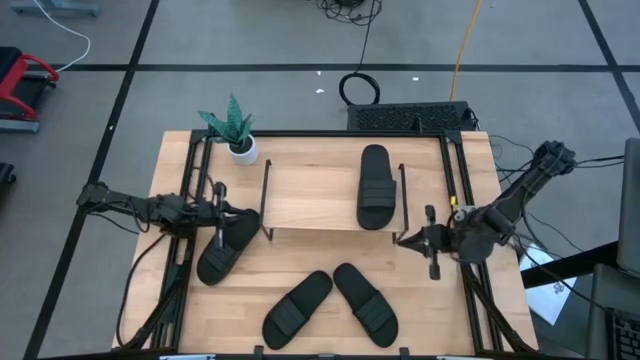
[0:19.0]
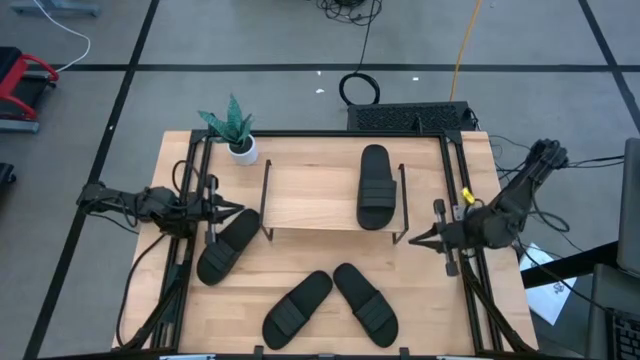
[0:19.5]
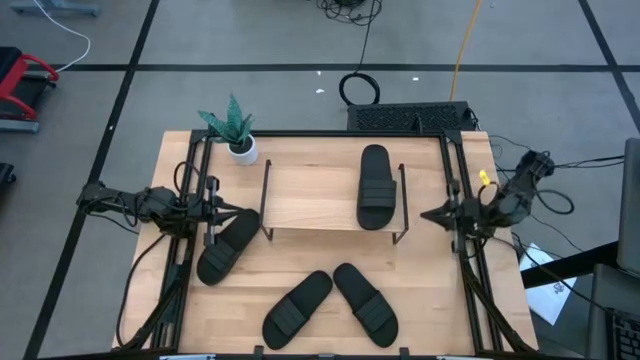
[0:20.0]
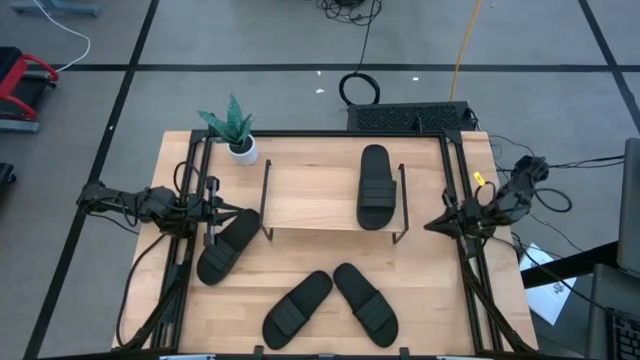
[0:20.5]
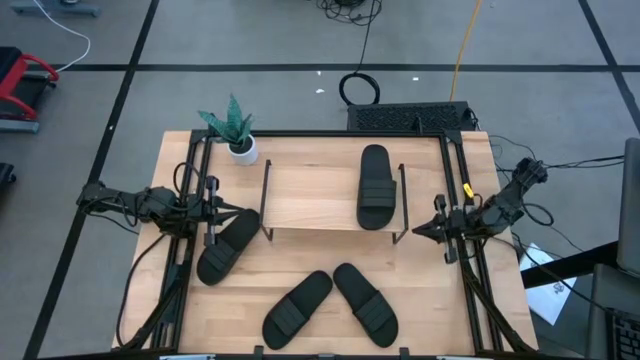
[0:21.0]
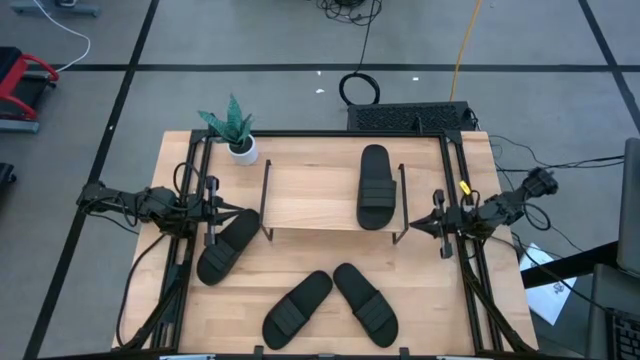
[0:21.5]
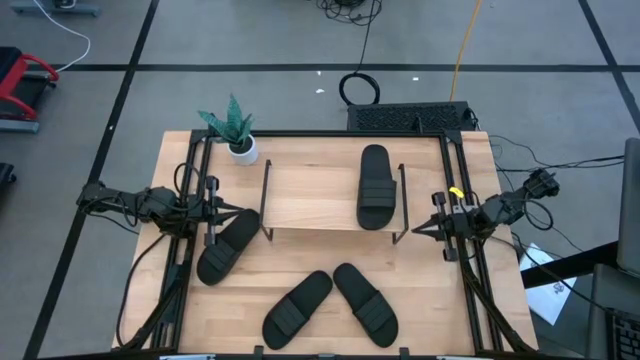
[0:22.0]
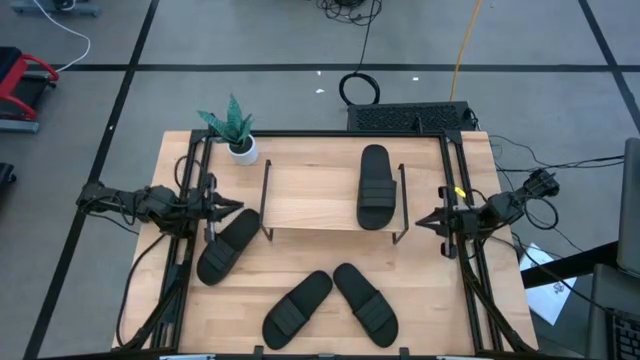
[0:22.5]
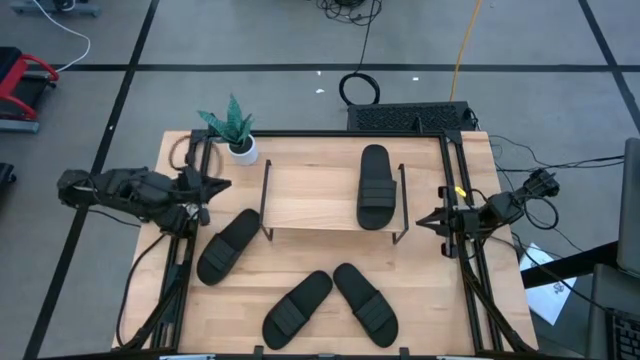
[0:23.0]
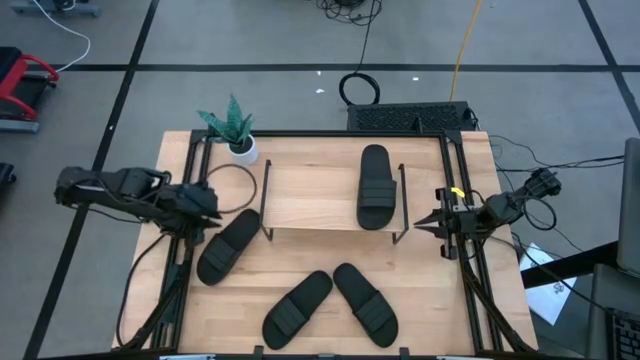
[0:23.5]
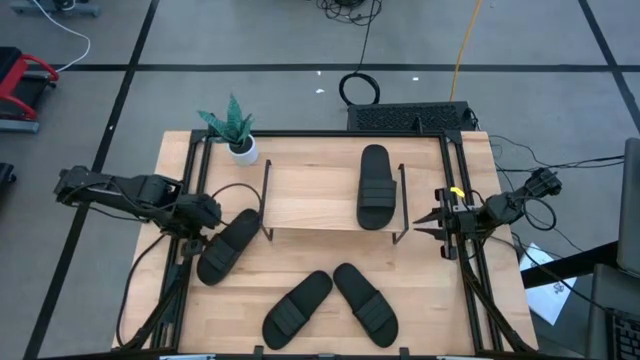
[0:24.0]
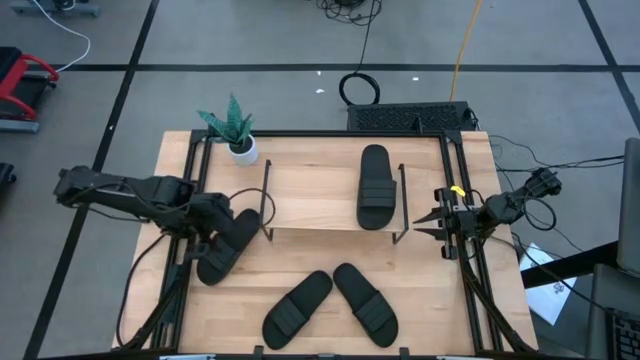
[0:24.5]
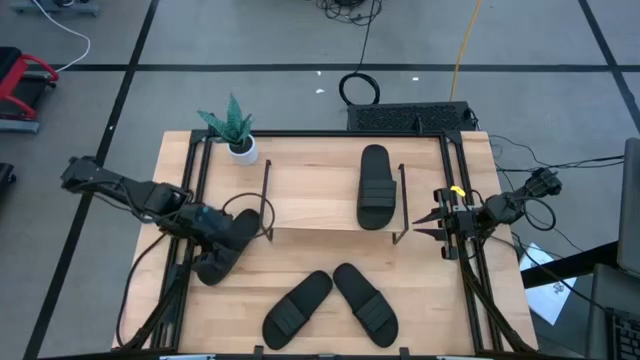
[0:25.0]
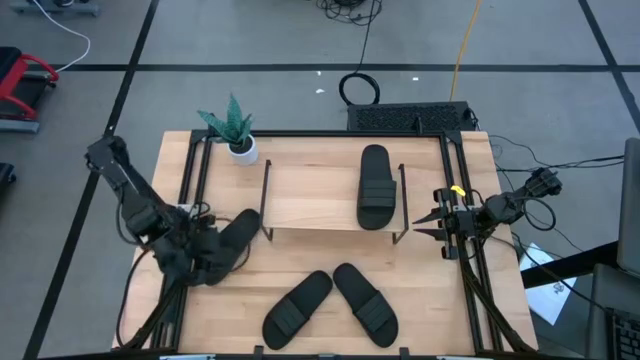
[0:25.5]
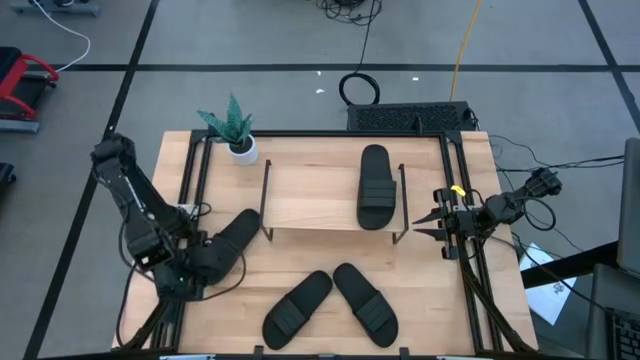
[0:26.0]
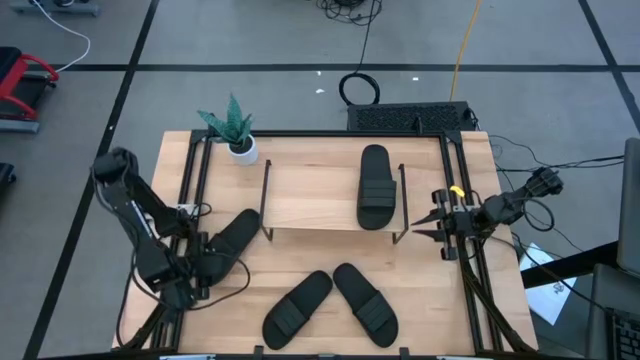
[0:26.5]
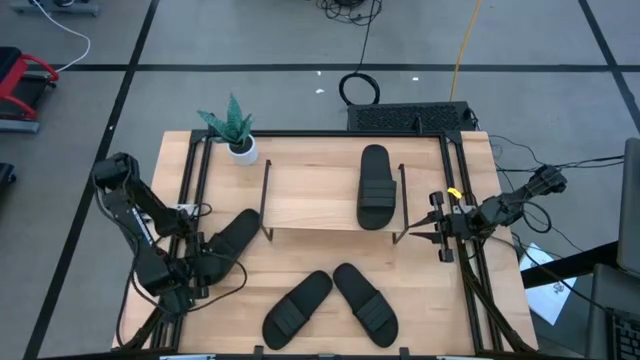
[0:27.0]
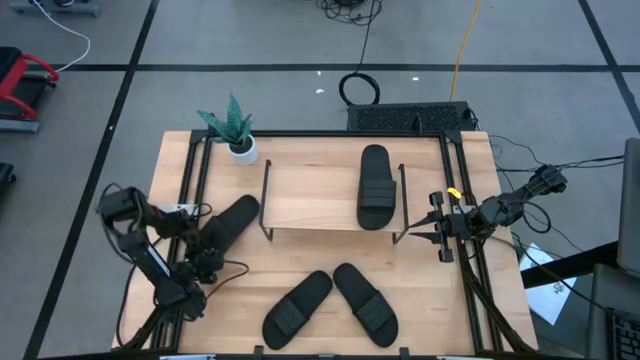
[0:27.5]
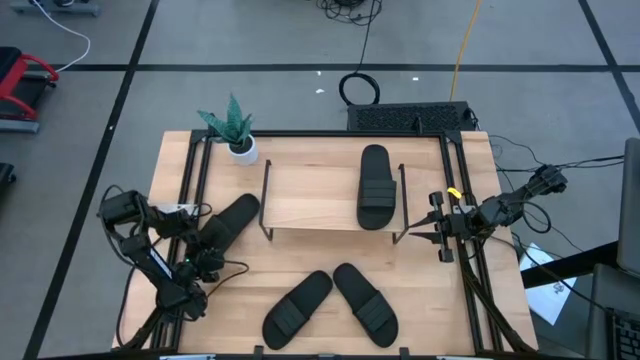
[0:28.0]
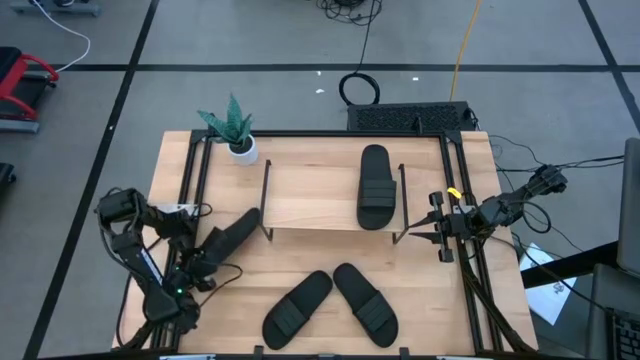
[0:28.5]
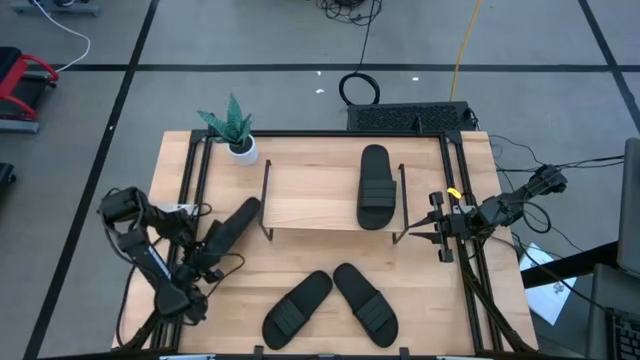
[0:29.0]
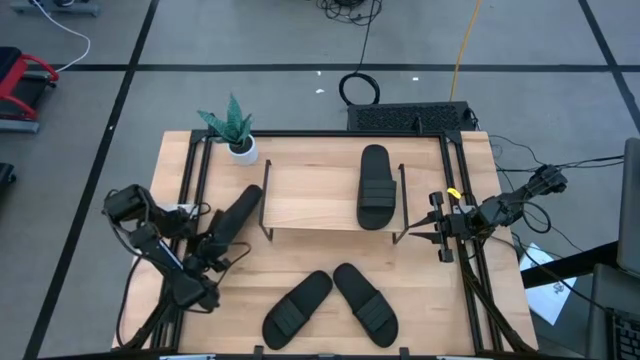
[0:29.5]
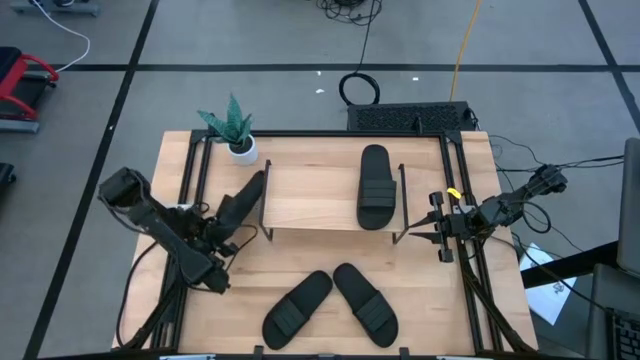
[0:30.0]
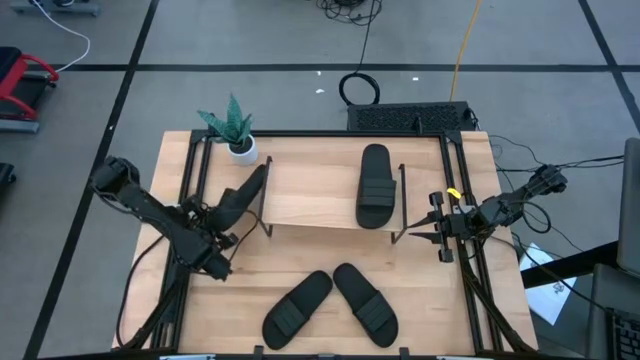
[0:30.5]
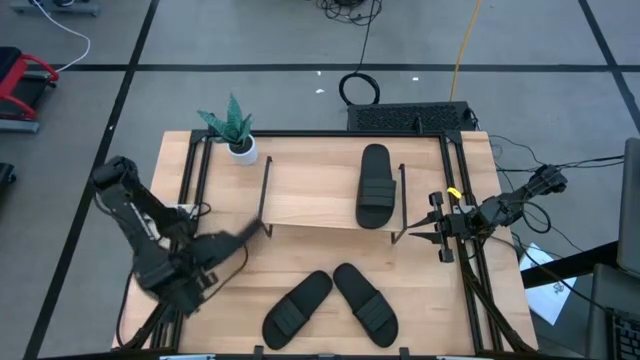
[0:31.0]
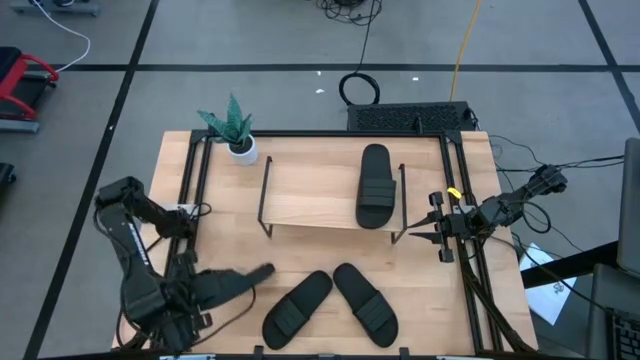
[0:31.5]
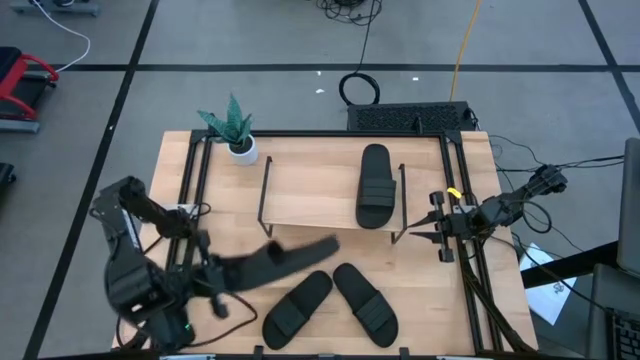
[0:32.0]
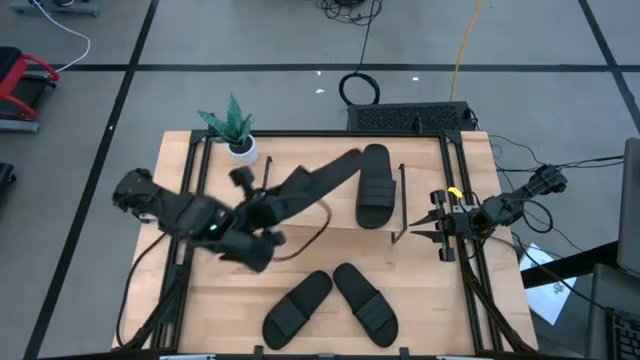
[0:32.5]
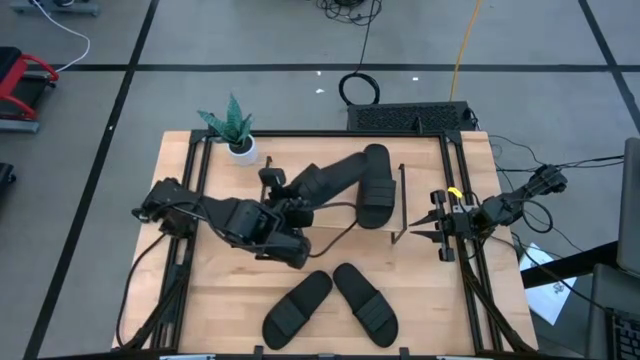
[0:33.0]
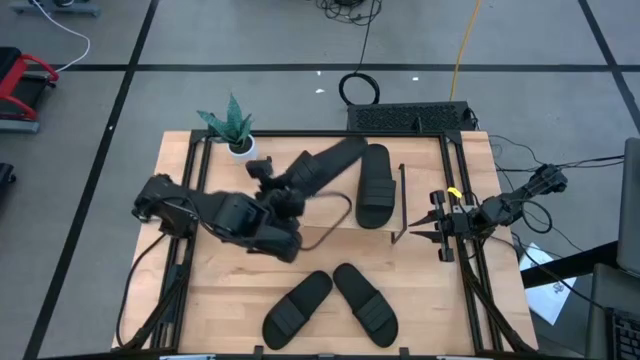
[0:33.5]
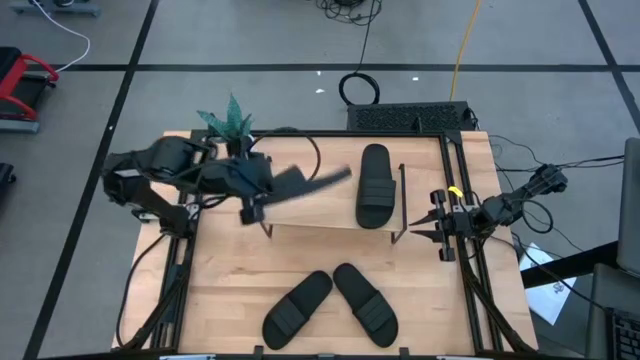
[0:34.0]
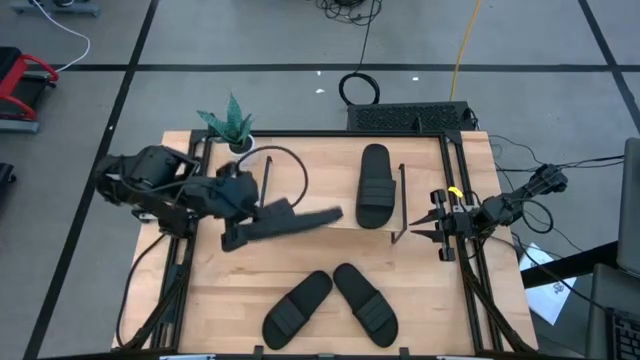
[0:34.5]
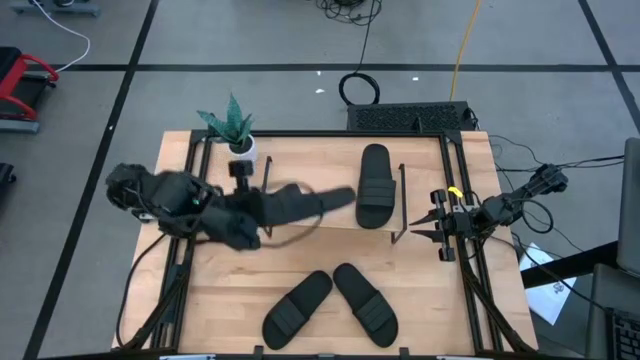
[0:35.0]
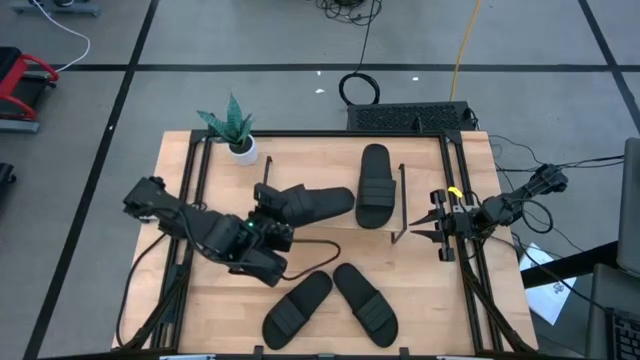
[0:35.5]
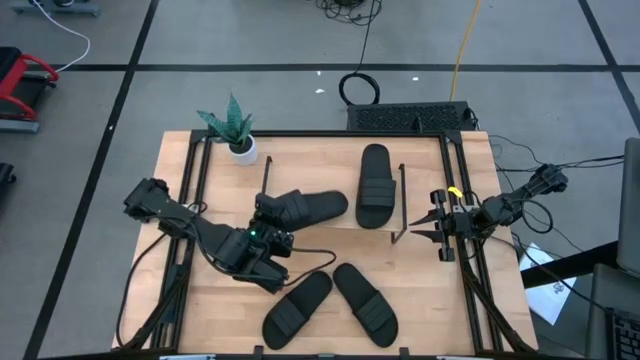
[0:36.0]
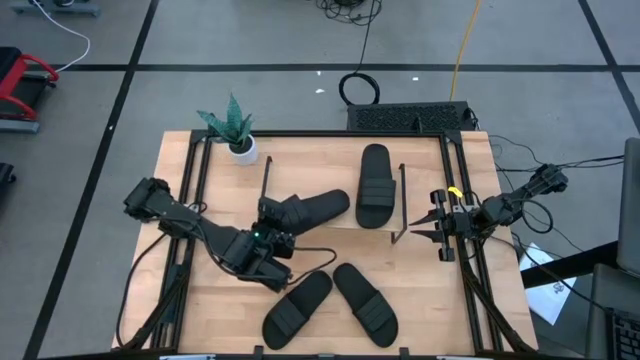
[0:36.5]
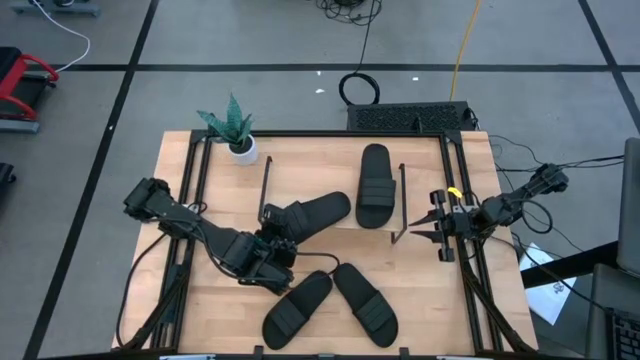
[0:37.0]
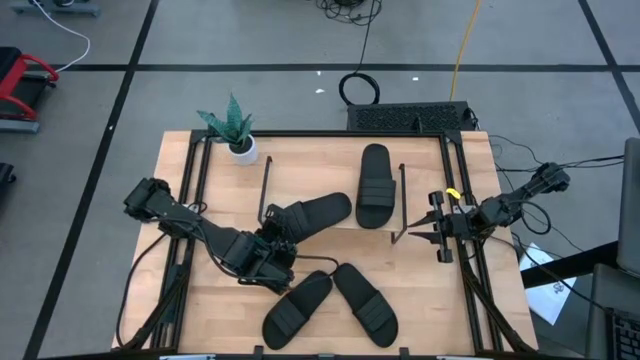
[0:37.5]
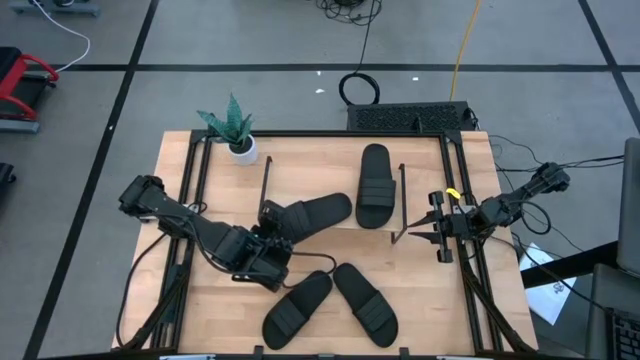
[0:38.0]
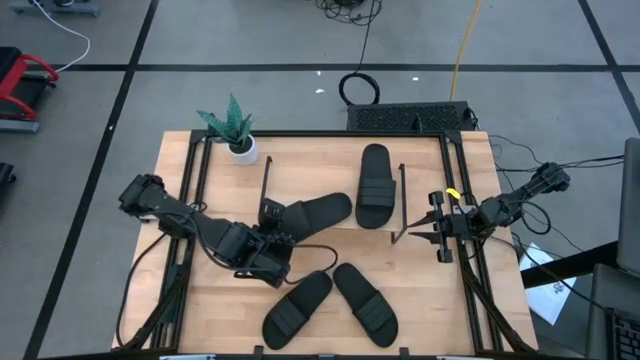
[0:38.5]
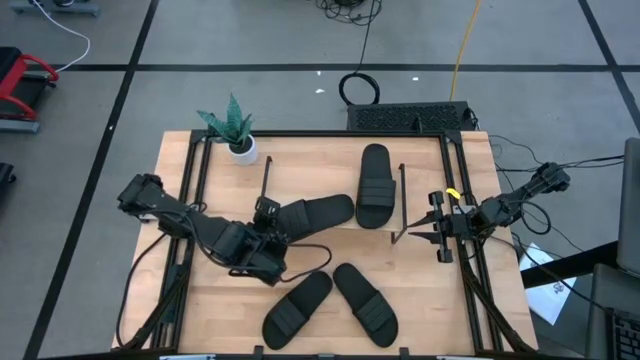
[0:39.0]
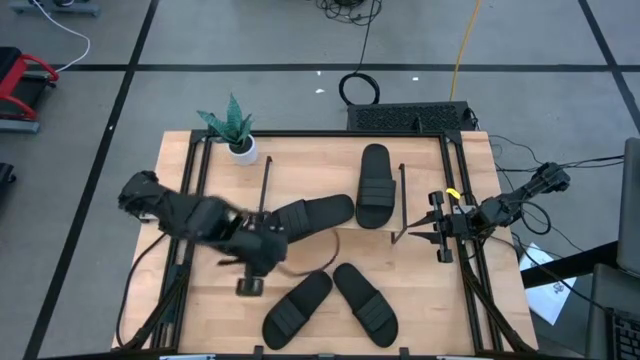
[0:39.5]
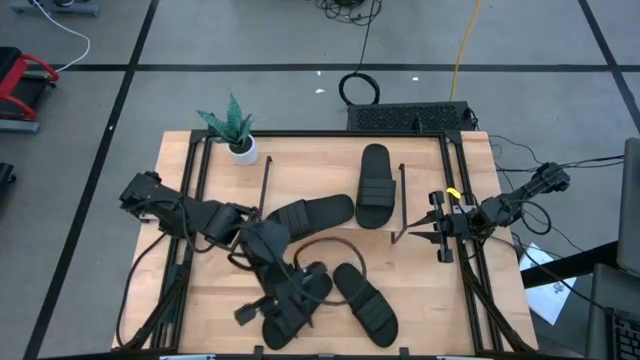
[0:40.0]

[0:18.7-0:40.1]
Task: Pick and place slides into the shelf
Put the top left black slide on the shelf
